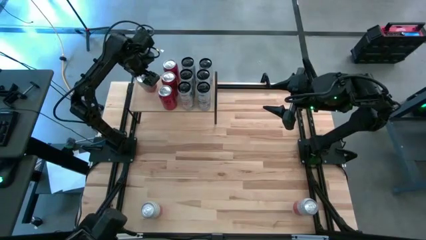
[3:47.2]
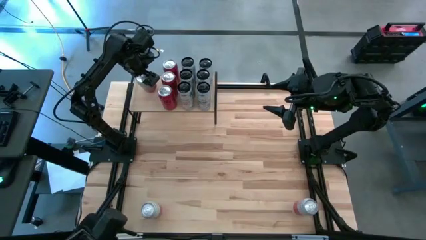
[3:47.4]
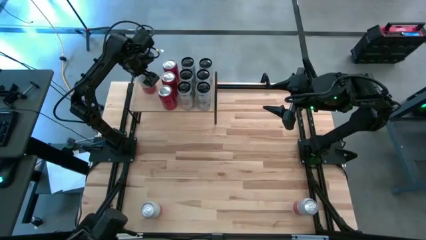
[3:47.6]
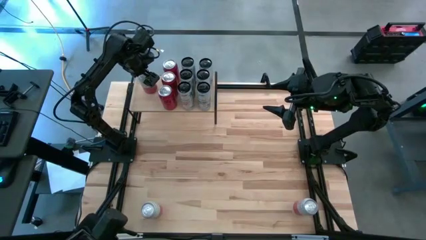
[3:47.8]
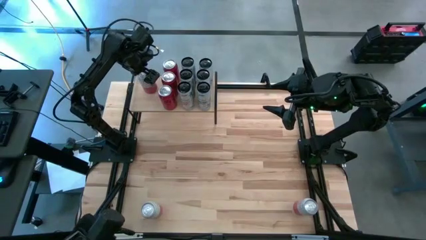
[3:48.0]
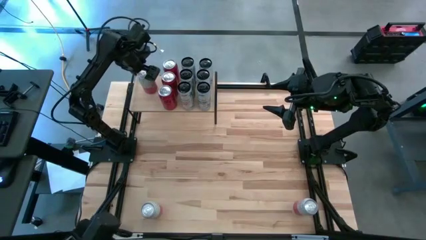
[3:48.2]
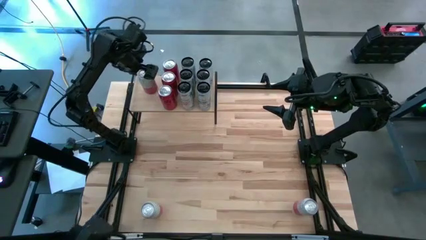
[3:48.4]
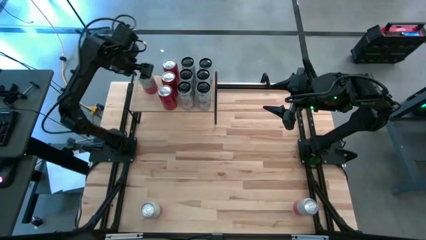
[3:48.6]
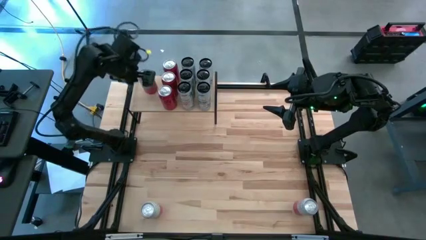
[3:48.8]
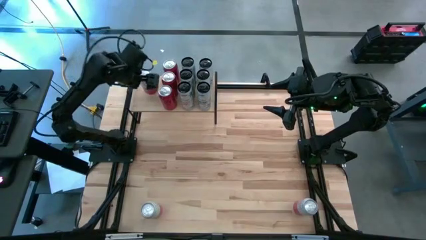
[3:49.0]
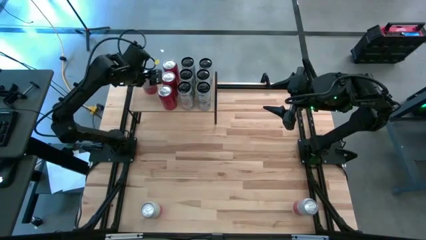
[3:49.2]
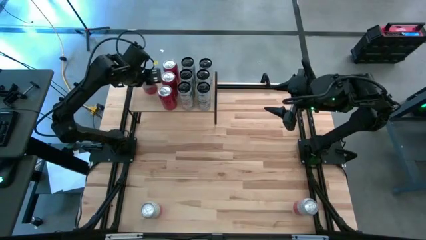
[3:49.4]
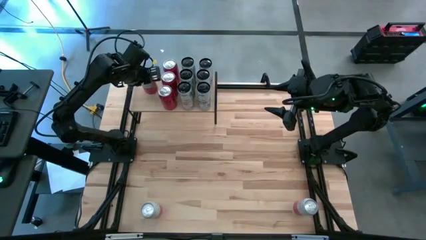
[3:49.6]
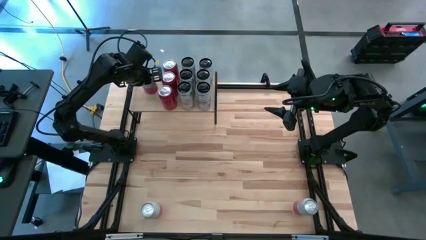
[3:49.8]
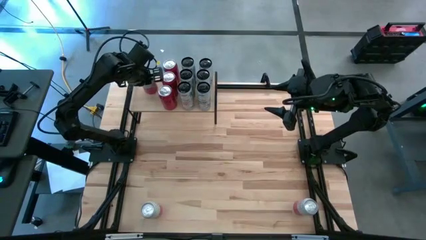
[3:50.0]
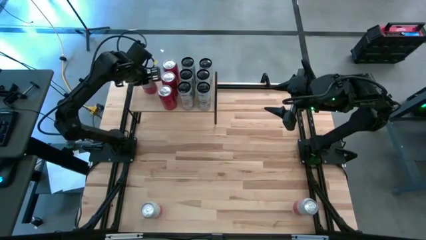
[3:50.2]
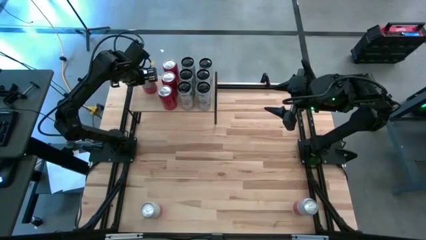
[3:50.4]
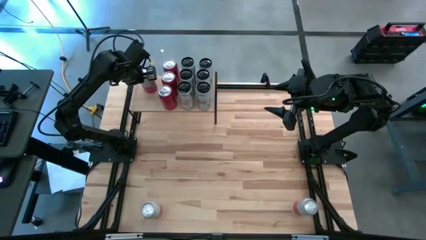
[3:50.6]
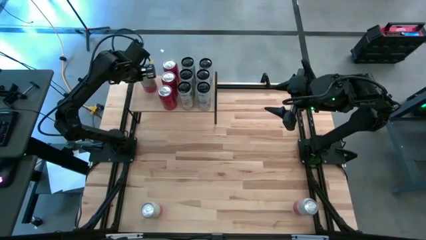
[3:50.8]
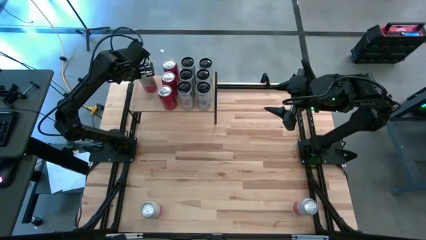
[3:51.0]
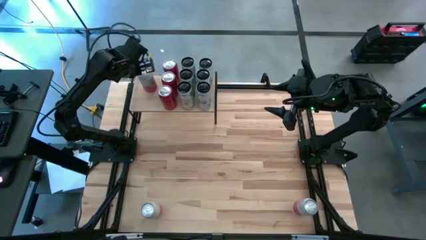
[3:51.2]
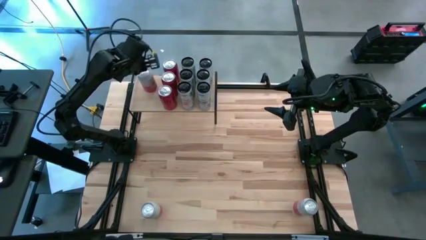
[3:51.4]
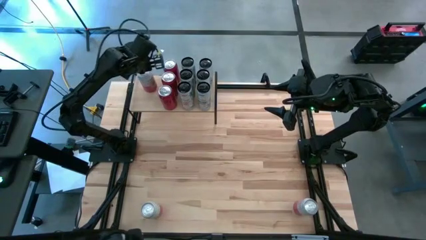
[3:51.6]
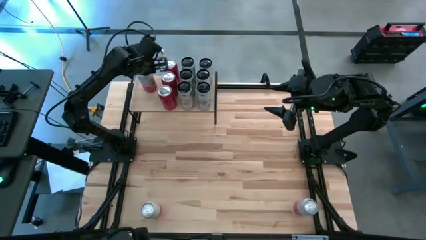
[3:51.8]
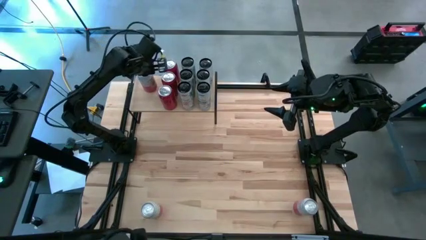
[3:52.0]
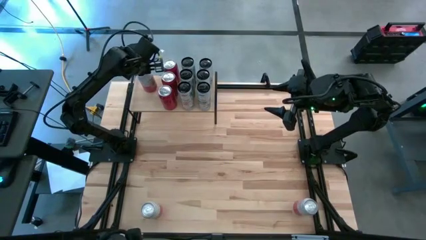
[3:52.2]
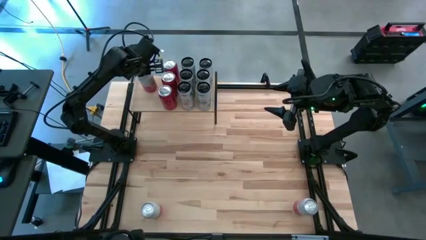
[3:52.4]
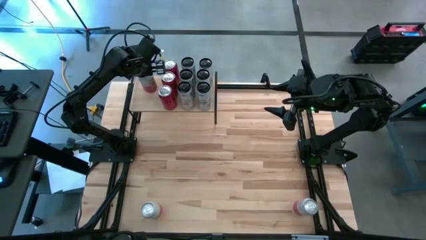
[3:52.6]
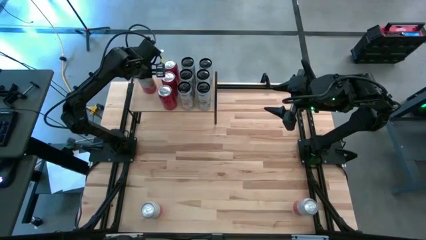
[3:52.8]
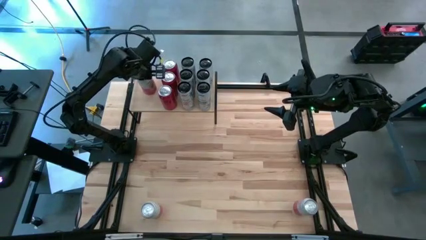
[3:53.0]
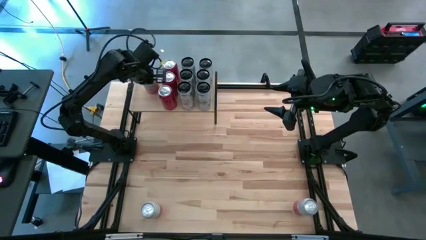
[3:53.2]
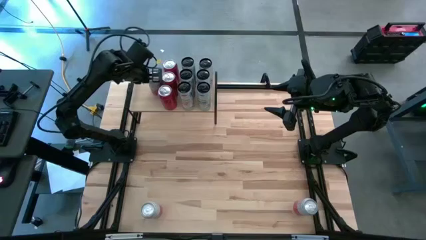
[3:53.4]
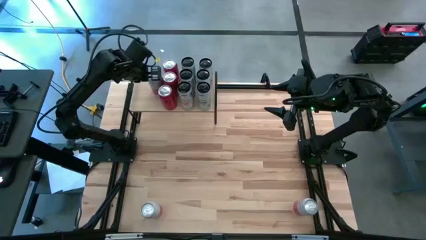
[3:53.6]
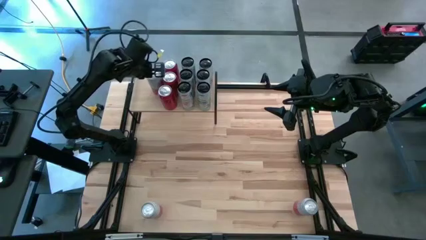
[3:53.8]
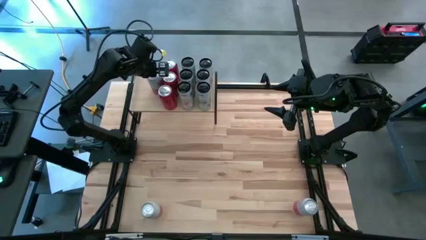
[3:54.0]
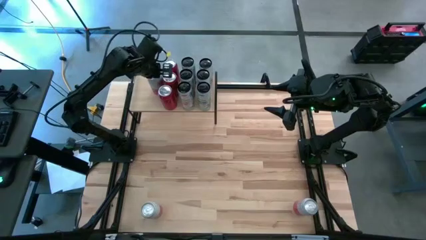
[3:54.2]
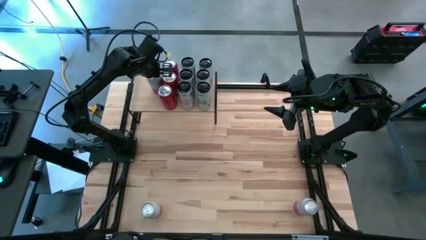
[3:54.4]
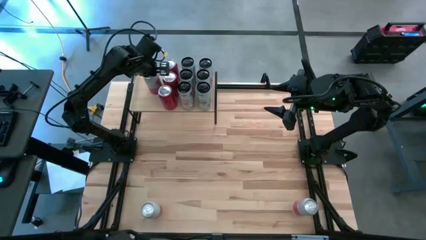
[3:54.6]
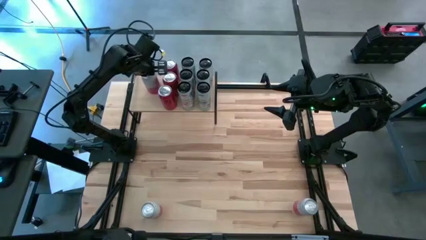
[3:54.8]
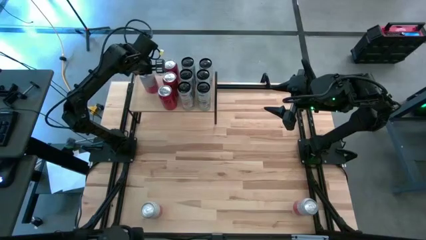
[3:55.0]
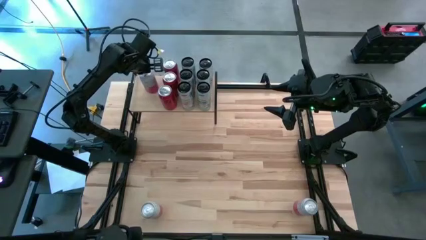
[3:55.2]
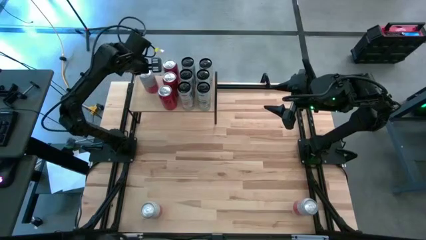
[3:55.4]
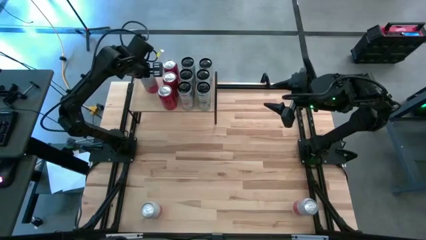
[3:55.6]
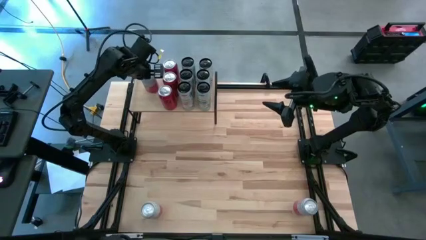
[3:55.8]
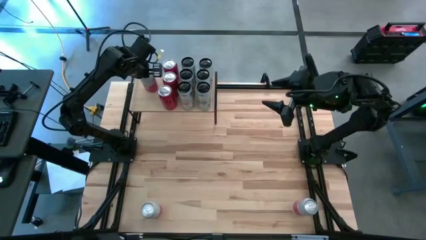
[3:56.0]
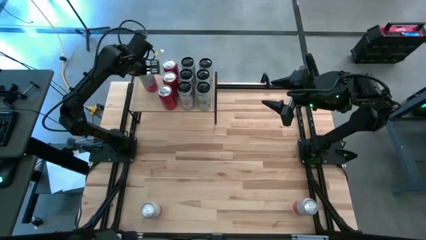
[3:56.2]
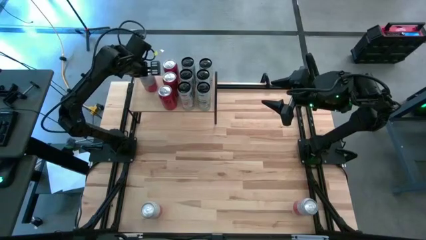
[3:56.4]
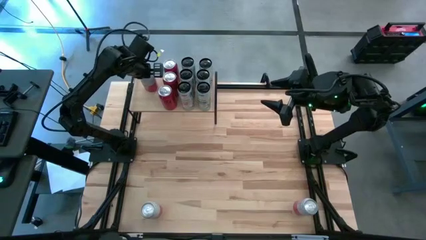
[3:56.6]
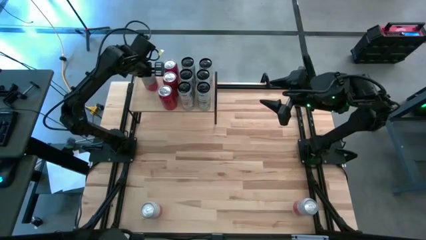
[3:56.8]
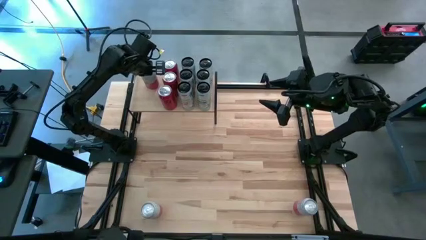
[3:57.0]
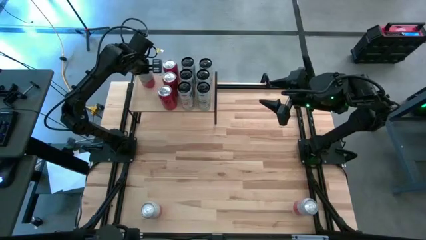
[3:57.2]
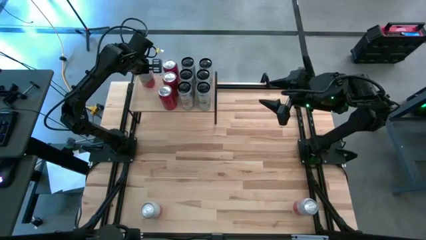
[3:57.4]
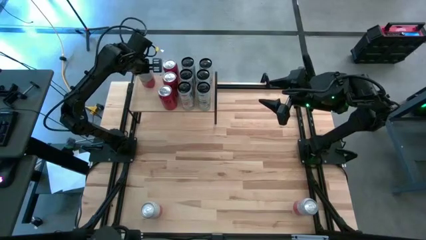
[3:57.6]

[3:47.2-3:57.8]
Task: Place canned beverage on shelf
Put the top pink soda can on the shelf
